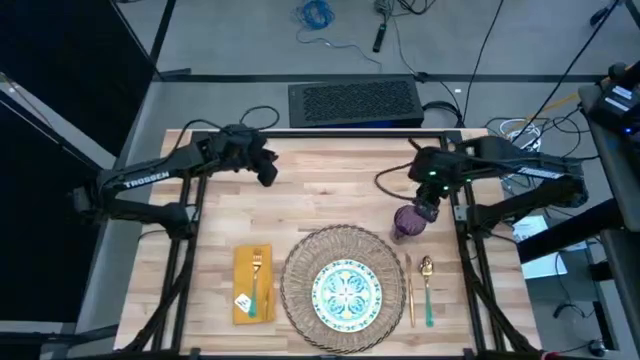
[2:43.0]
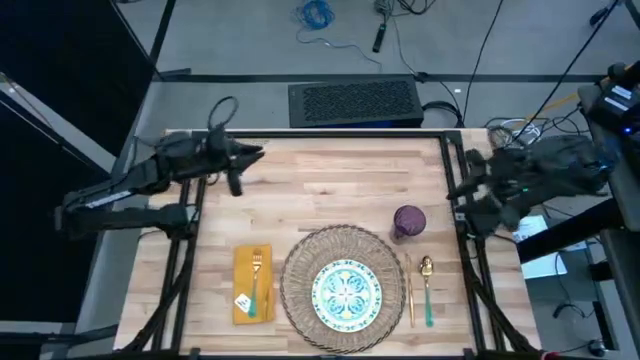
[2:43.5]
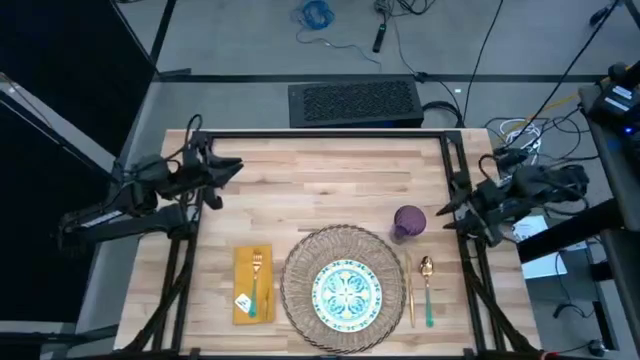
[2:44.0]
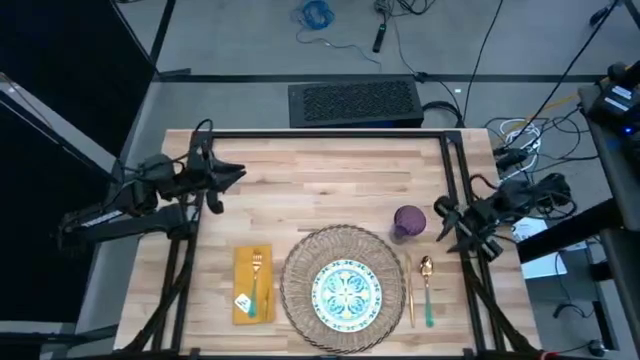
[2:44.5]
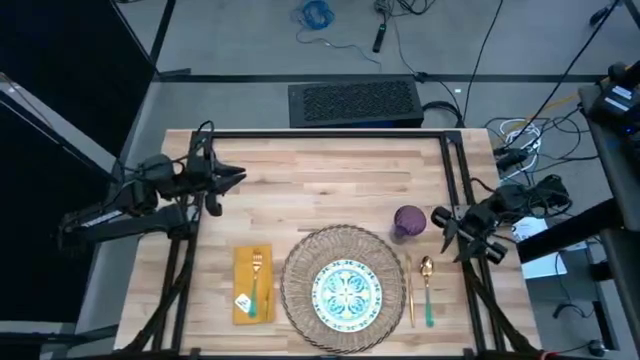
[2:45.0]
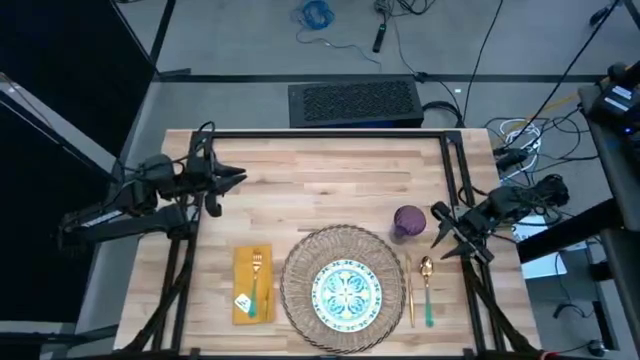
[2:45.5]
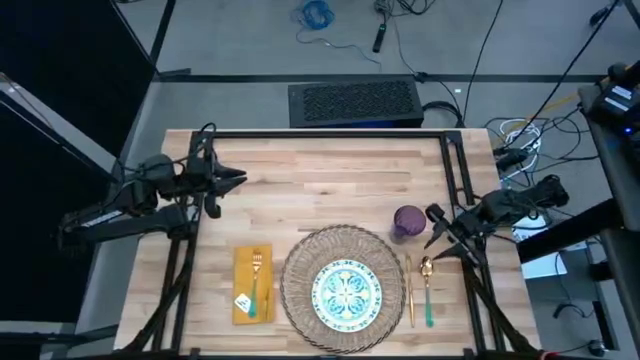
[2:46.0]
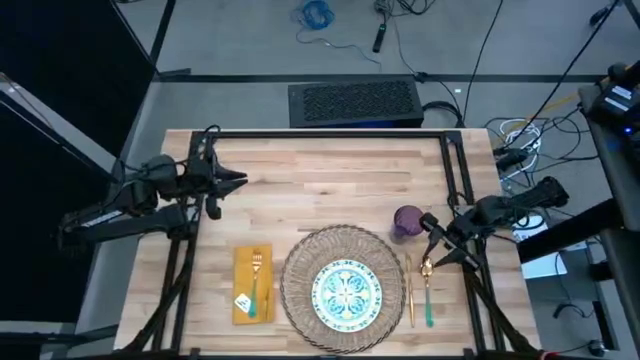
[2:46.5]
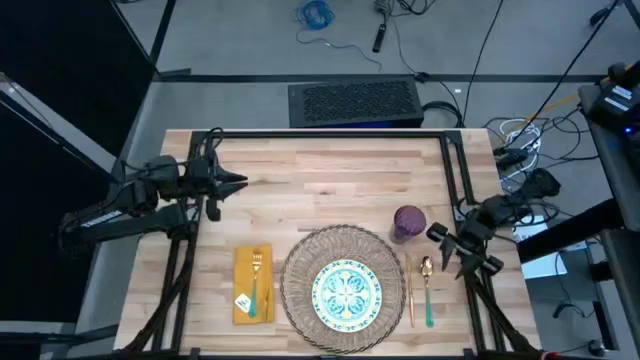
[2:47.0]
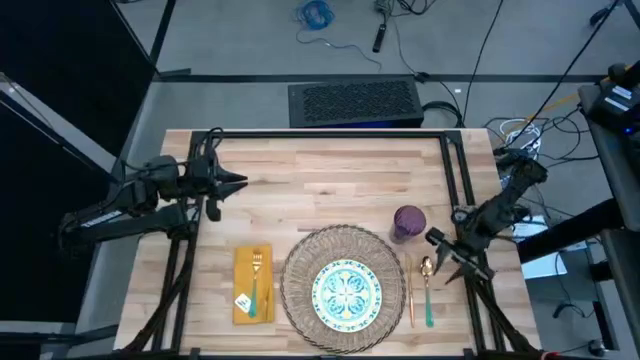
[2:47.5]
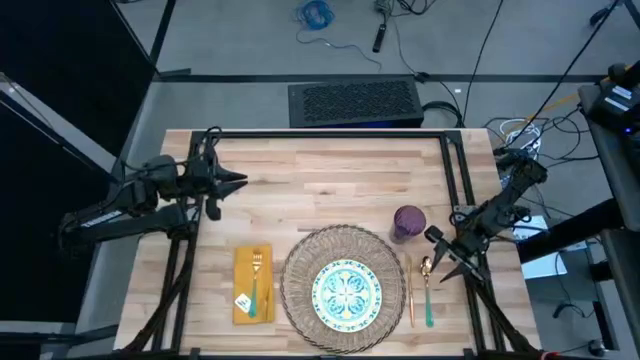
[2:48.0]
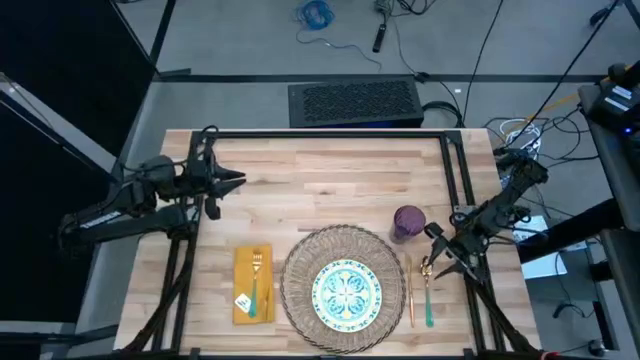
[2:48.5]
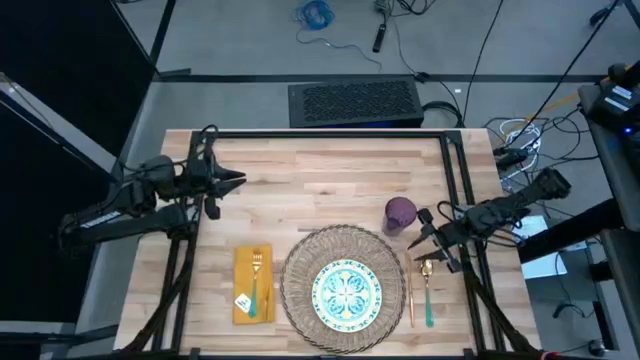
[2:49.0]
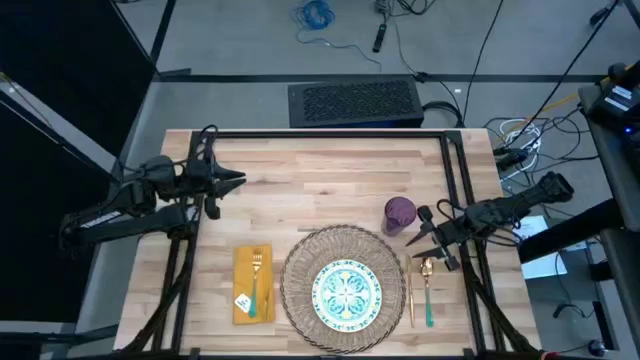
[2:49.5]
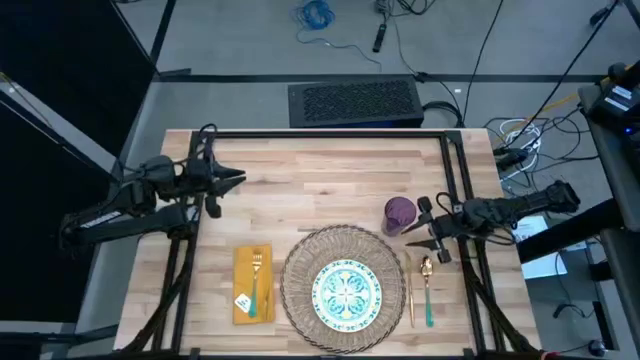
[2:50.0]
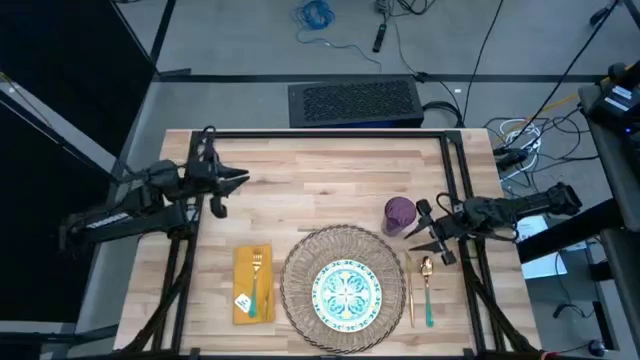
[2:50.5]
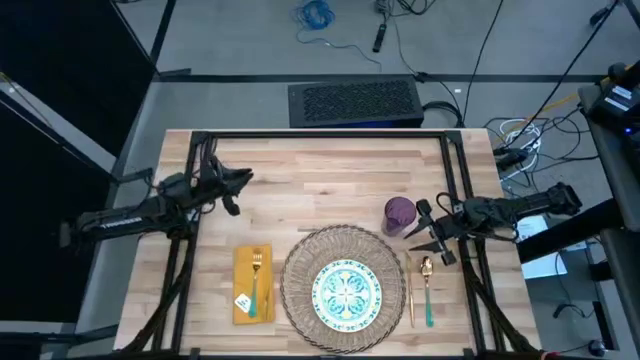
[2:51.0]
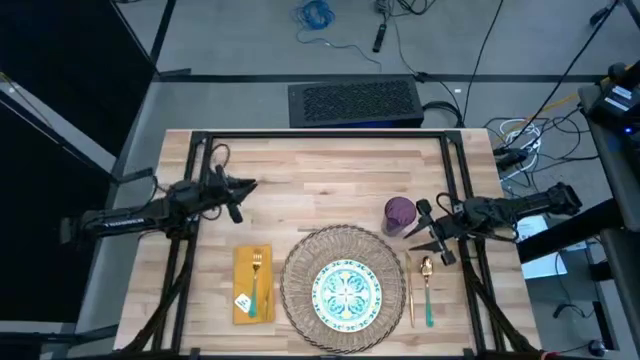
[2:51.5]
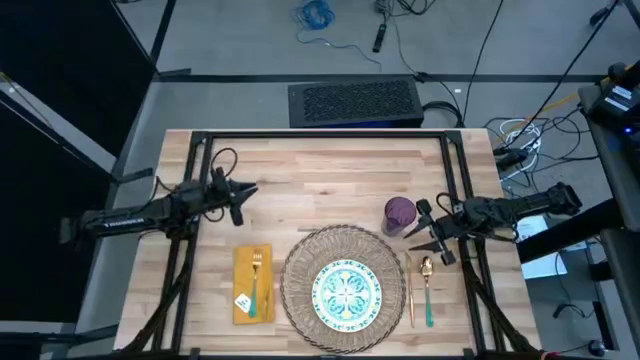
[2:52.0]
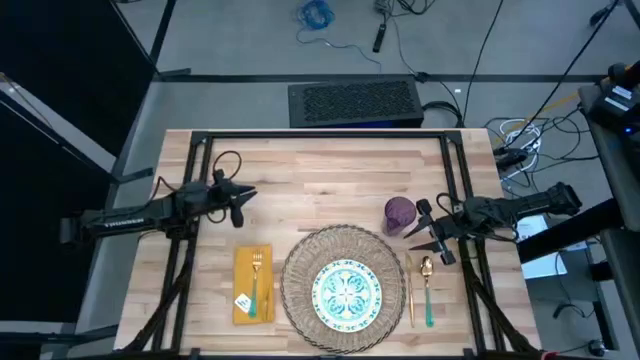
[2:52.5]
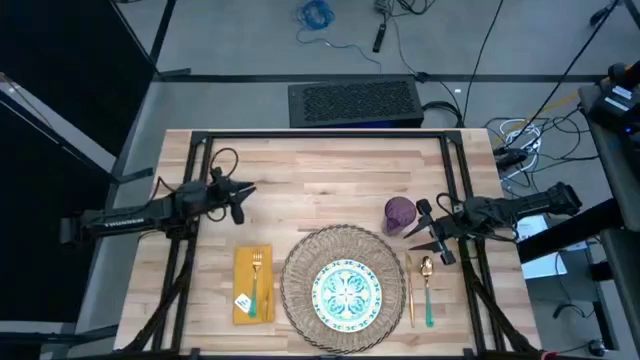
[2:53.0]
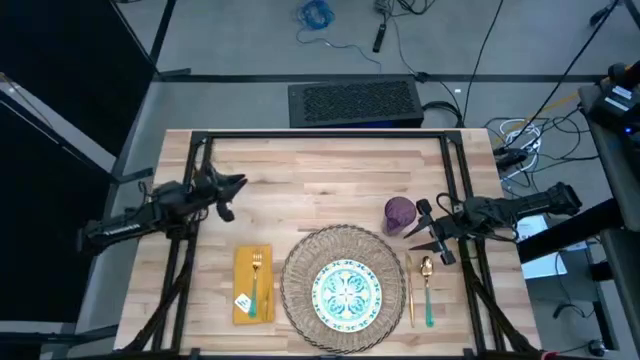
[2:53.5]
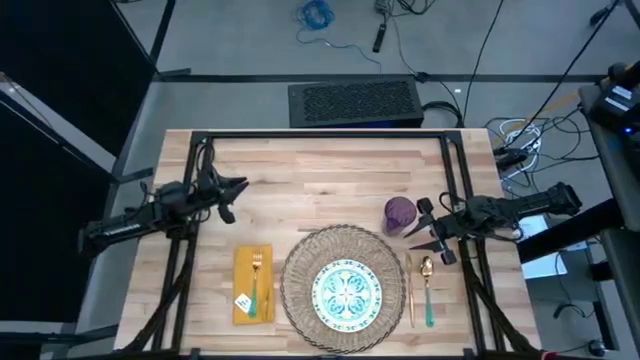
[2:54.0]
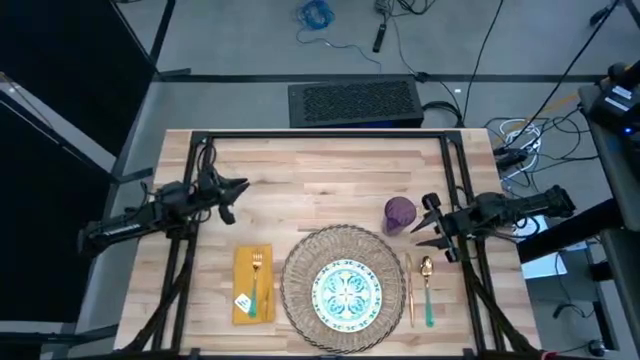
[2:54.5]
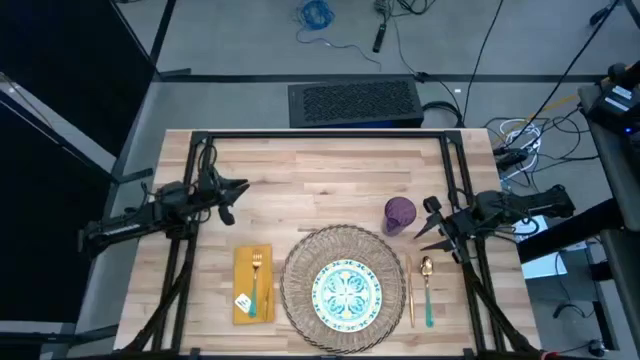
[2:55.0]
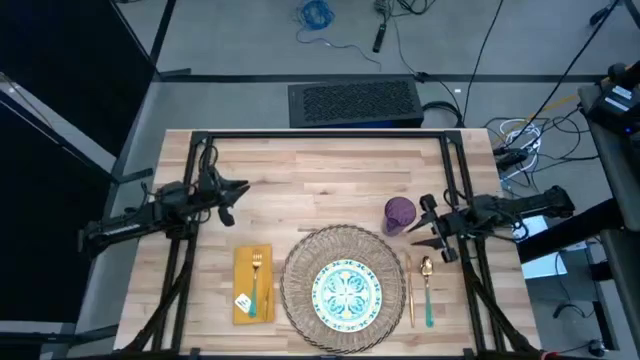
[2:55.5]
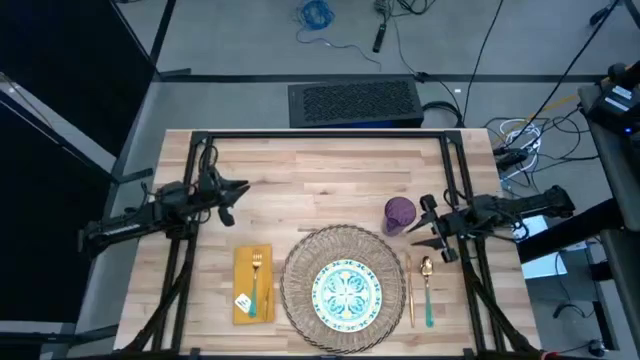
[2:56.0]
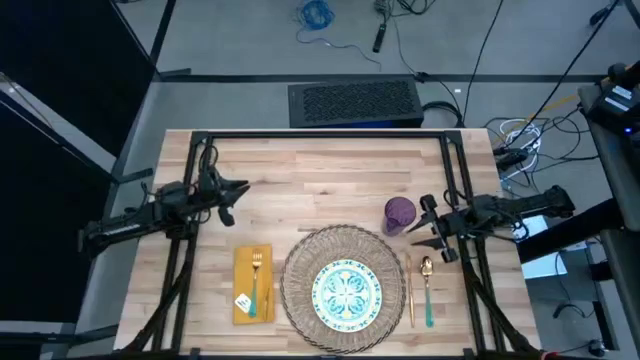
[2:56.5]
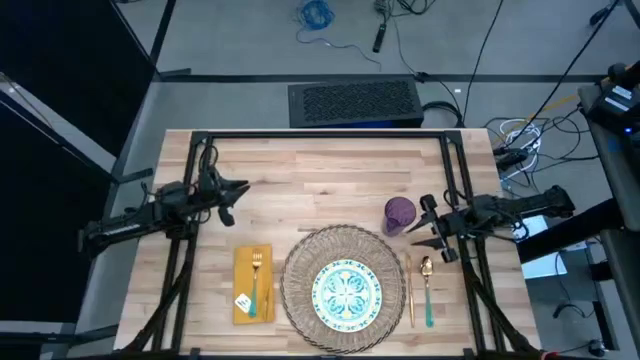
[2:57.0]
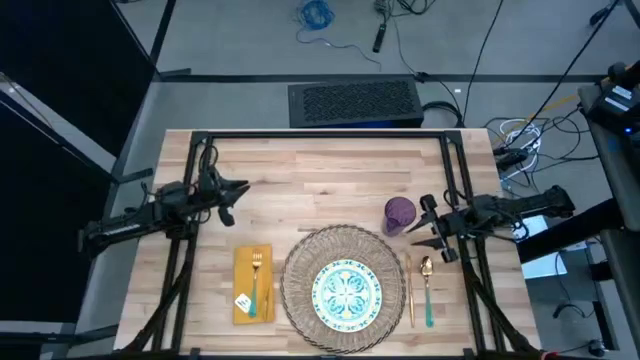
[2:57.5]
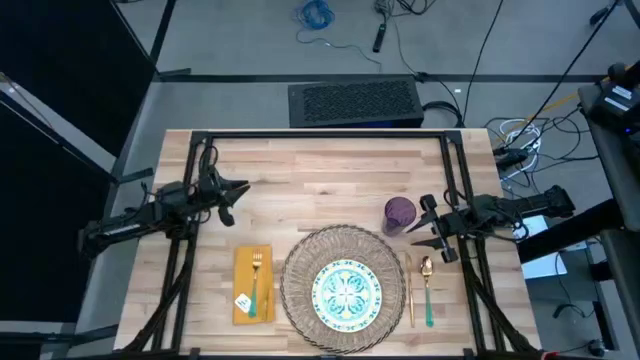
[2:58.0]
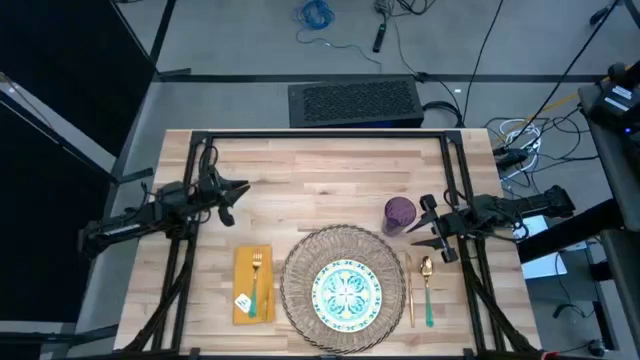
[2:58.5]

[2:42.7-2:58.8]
Task: Set table place
Return to Home Position
